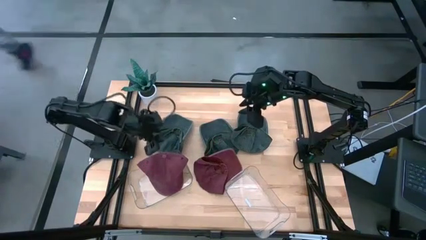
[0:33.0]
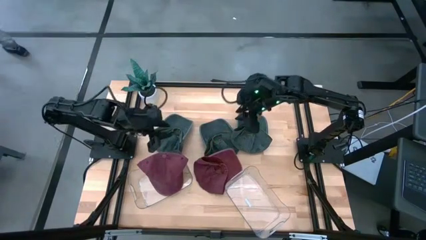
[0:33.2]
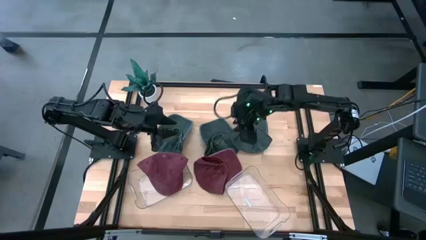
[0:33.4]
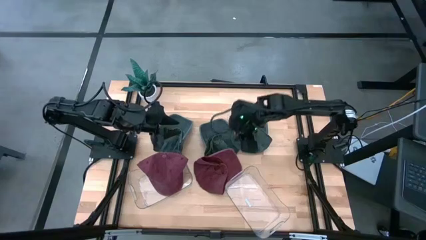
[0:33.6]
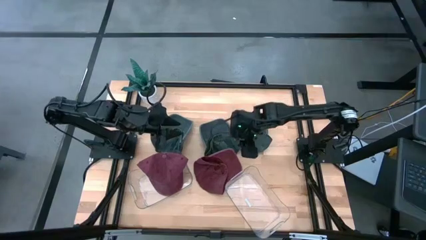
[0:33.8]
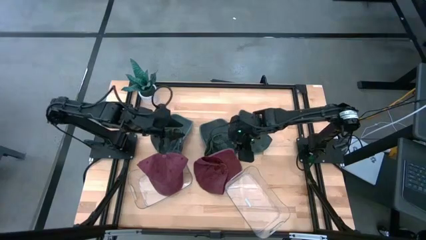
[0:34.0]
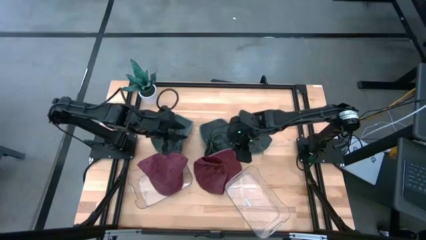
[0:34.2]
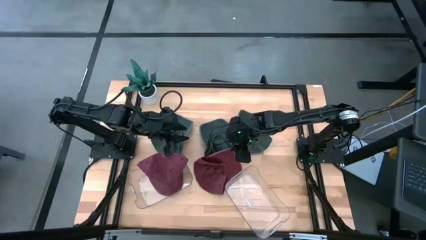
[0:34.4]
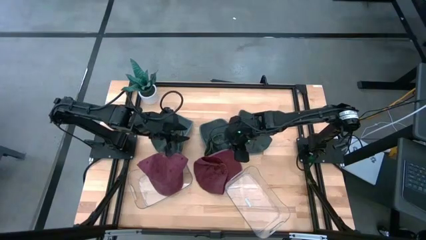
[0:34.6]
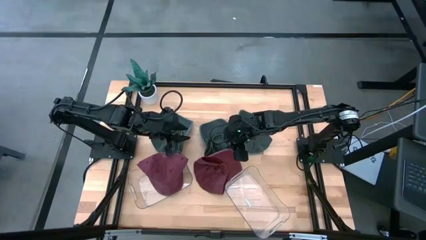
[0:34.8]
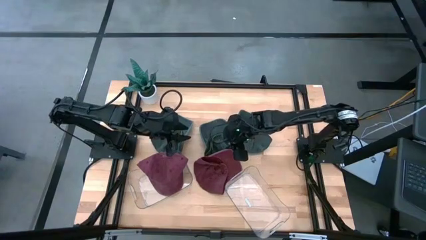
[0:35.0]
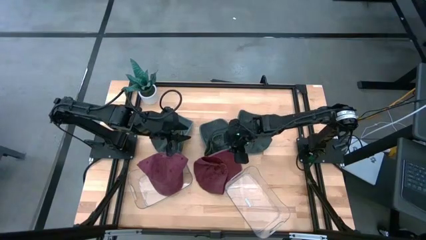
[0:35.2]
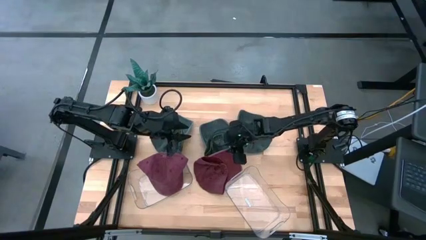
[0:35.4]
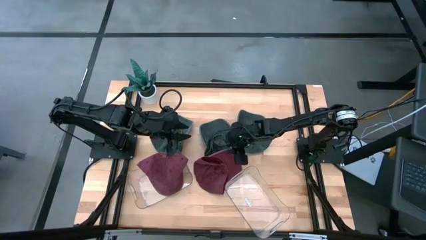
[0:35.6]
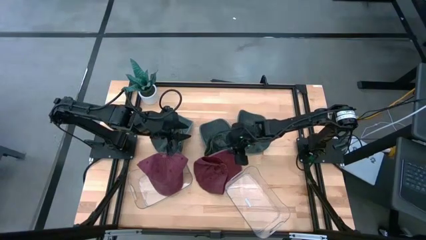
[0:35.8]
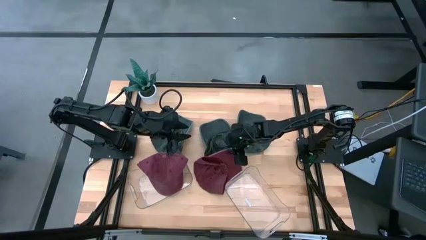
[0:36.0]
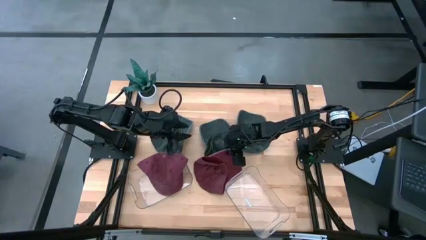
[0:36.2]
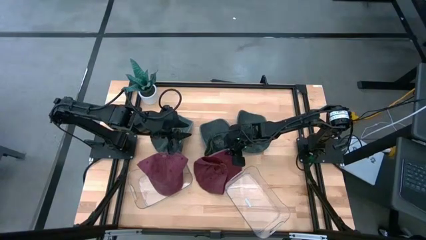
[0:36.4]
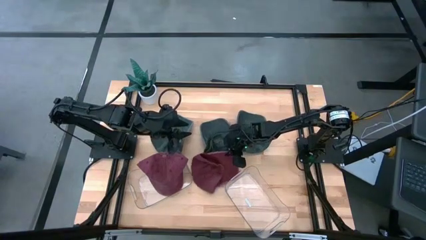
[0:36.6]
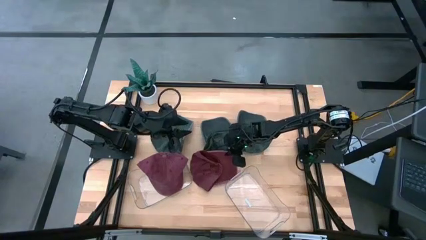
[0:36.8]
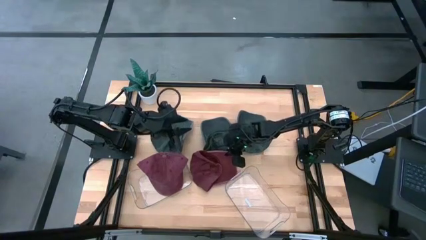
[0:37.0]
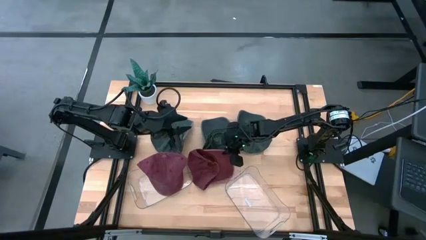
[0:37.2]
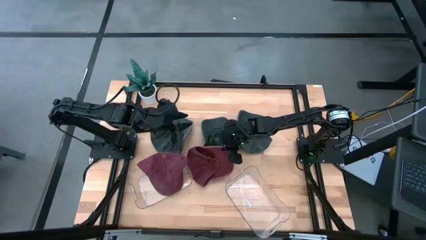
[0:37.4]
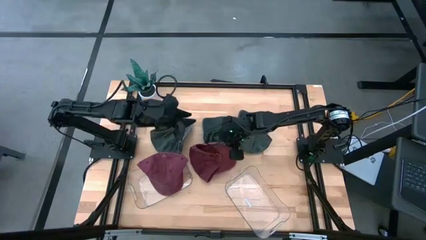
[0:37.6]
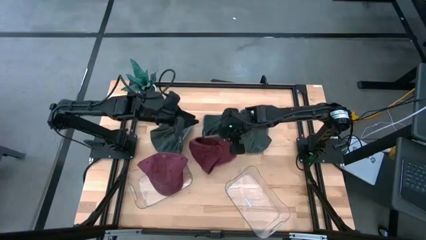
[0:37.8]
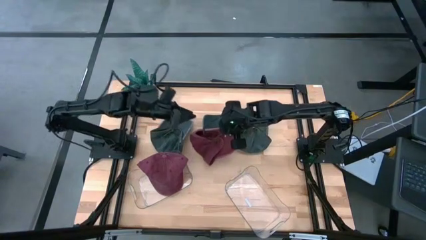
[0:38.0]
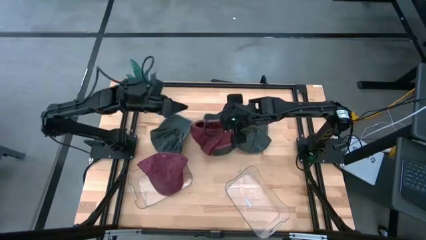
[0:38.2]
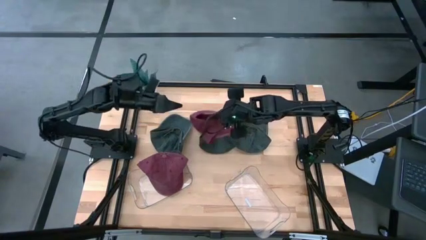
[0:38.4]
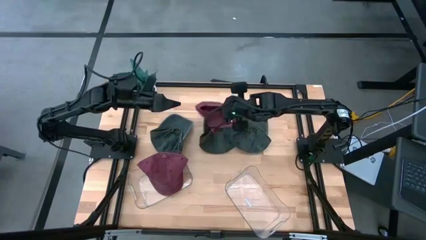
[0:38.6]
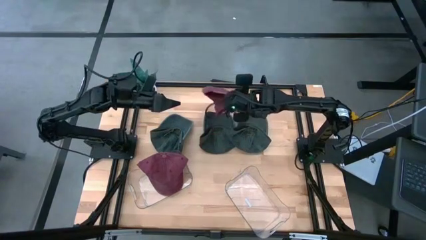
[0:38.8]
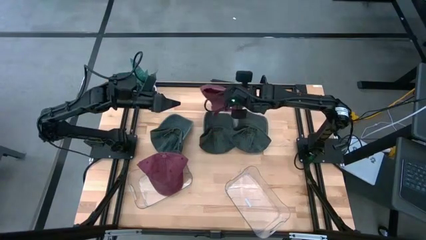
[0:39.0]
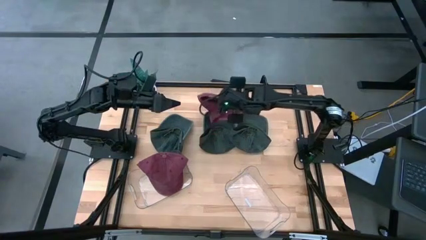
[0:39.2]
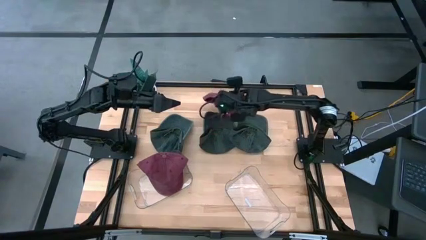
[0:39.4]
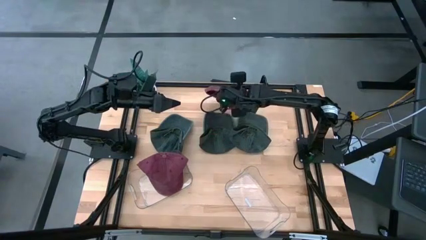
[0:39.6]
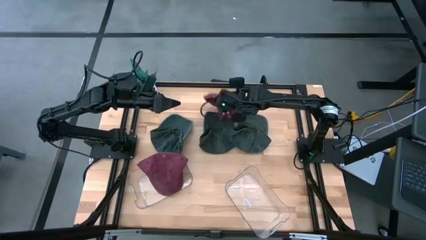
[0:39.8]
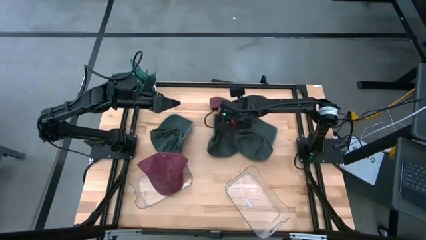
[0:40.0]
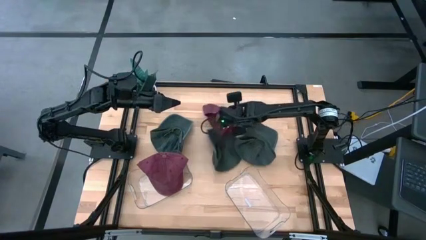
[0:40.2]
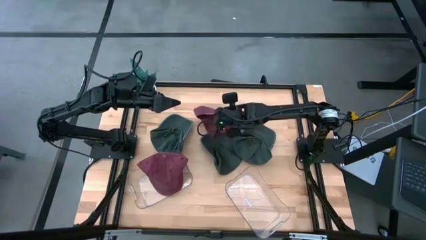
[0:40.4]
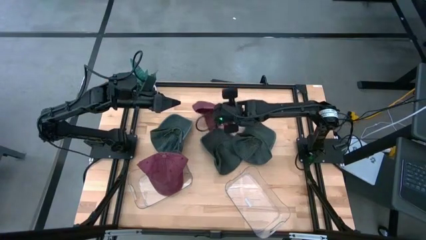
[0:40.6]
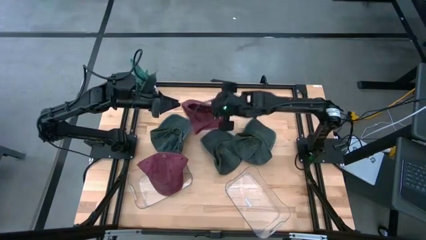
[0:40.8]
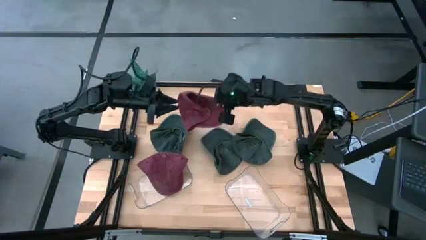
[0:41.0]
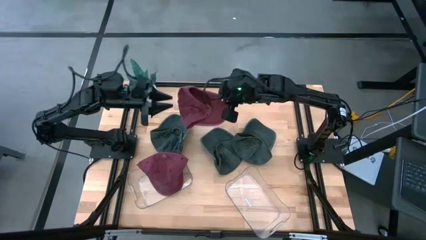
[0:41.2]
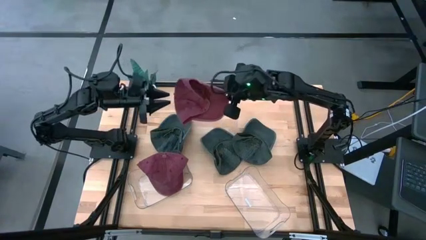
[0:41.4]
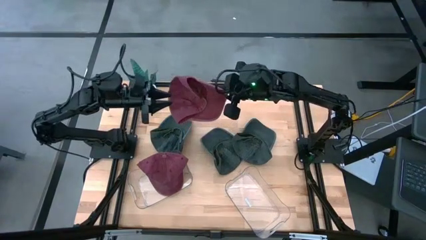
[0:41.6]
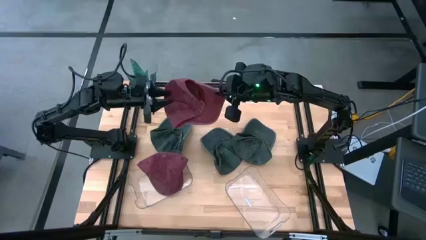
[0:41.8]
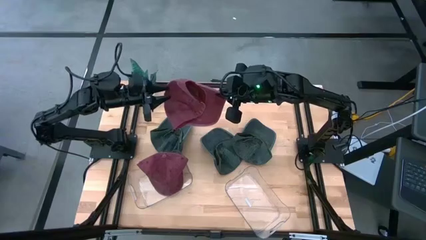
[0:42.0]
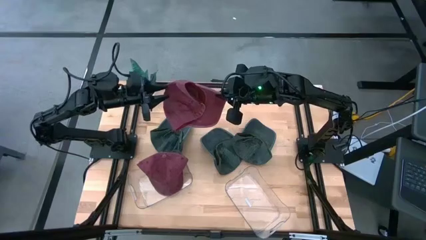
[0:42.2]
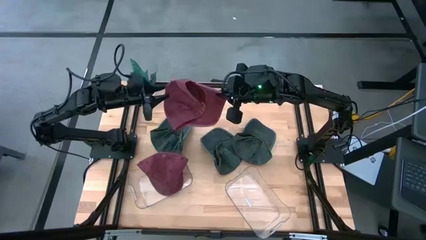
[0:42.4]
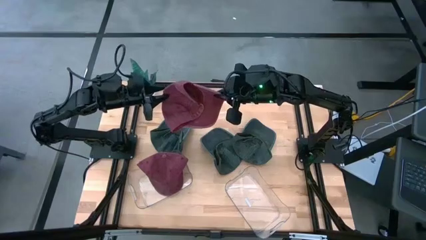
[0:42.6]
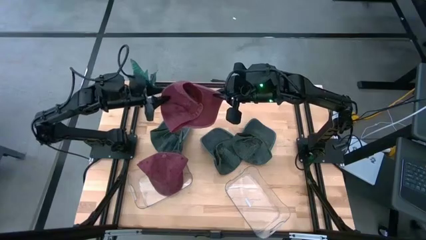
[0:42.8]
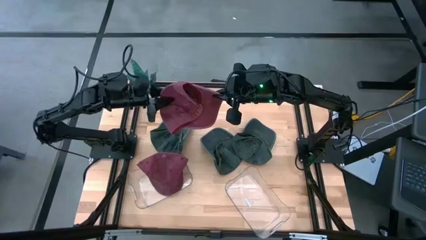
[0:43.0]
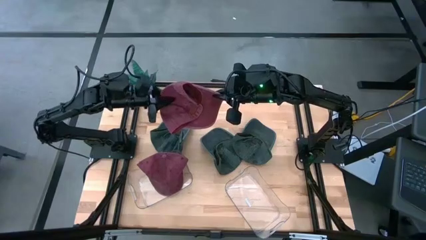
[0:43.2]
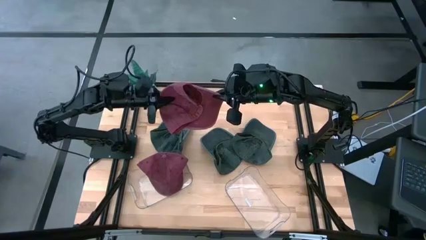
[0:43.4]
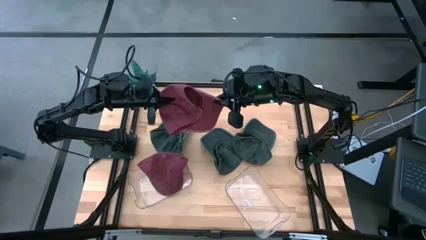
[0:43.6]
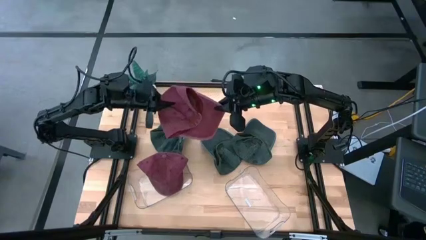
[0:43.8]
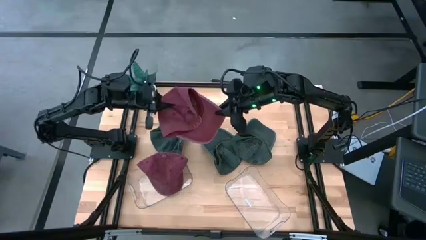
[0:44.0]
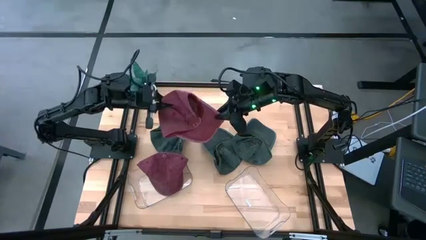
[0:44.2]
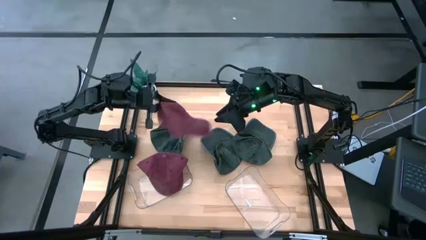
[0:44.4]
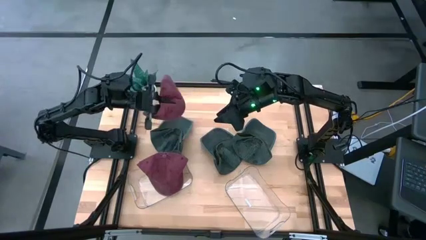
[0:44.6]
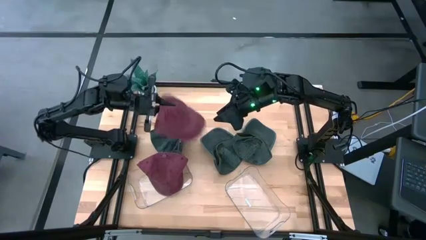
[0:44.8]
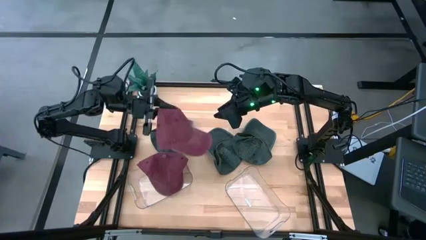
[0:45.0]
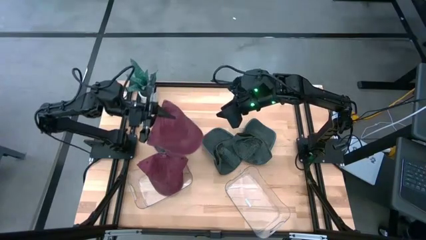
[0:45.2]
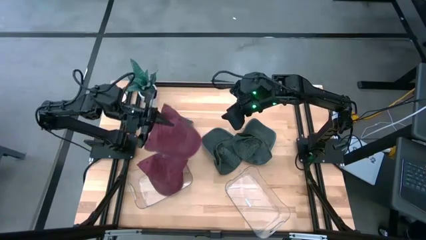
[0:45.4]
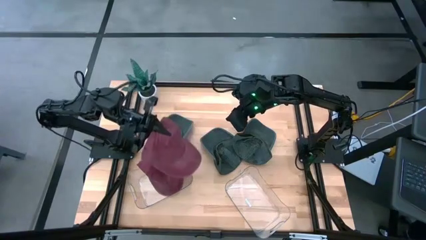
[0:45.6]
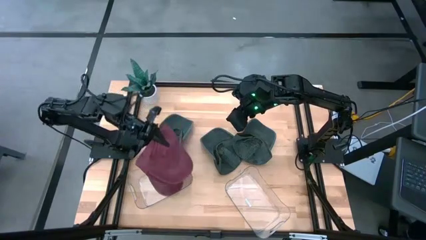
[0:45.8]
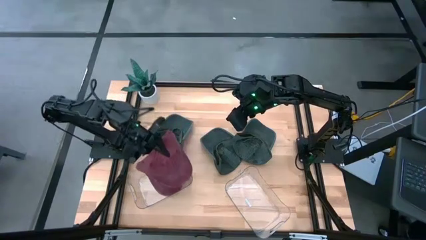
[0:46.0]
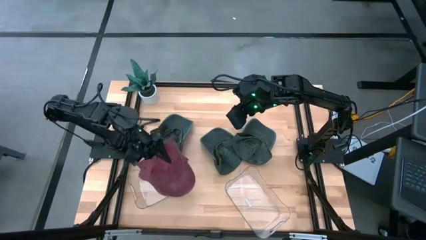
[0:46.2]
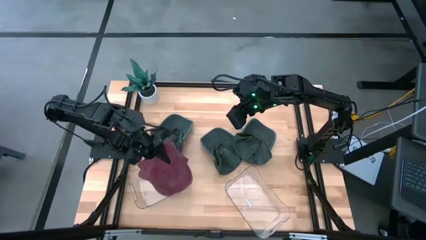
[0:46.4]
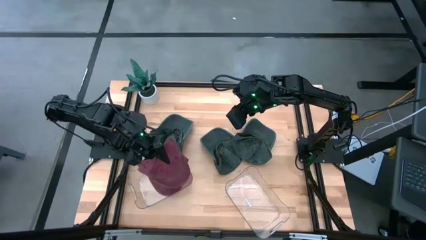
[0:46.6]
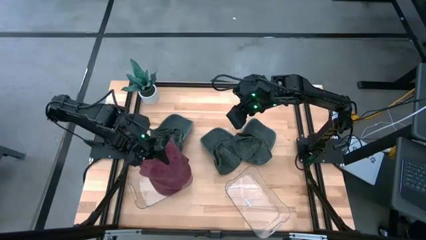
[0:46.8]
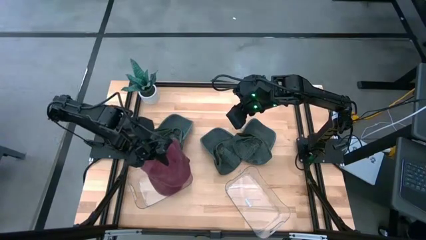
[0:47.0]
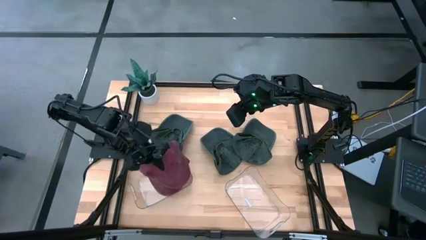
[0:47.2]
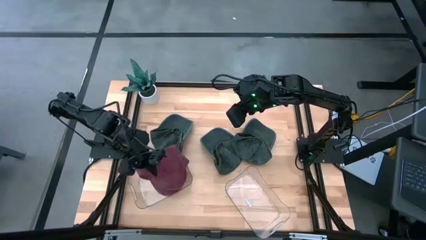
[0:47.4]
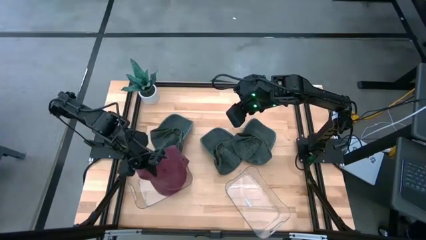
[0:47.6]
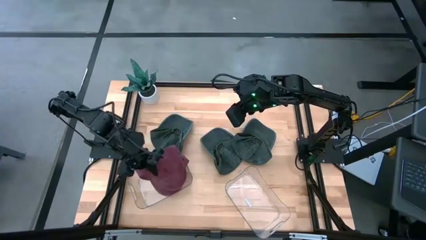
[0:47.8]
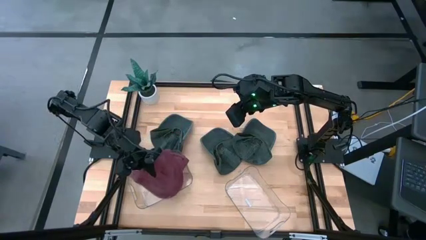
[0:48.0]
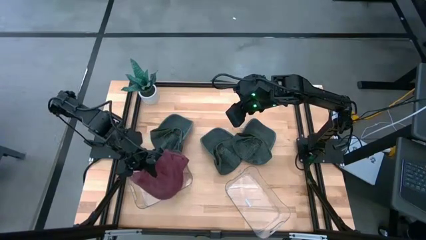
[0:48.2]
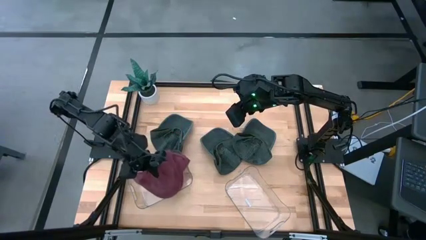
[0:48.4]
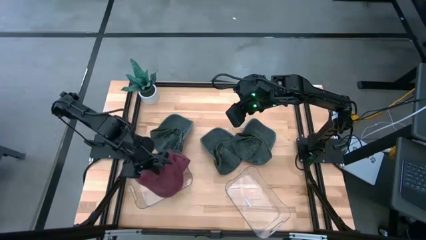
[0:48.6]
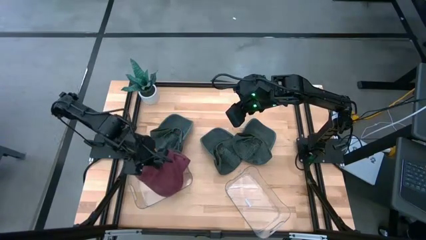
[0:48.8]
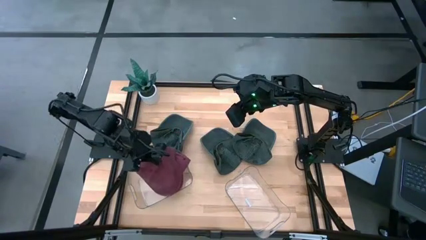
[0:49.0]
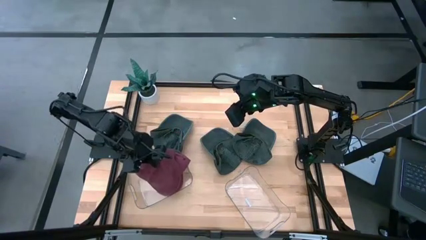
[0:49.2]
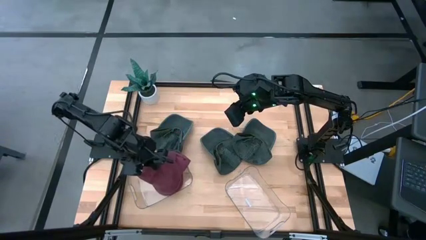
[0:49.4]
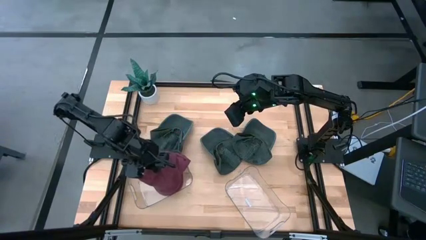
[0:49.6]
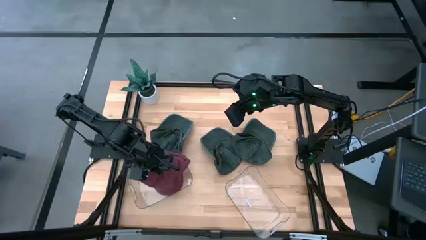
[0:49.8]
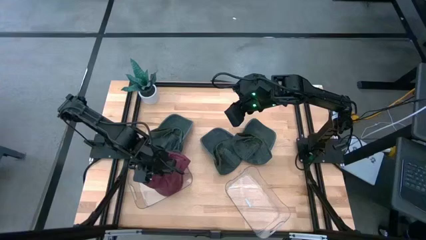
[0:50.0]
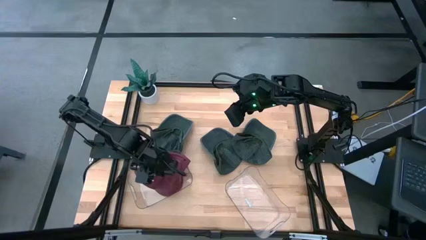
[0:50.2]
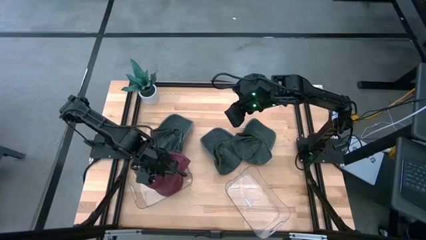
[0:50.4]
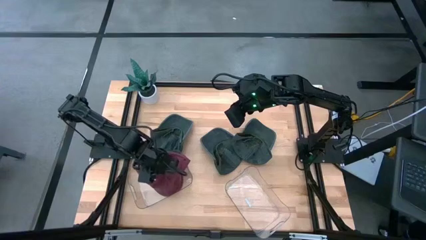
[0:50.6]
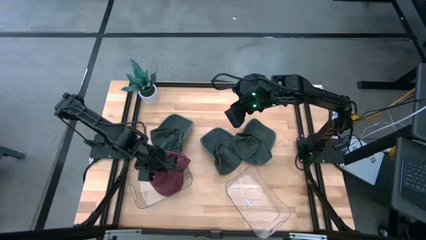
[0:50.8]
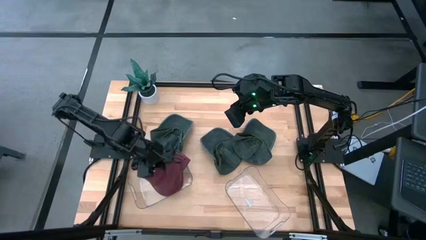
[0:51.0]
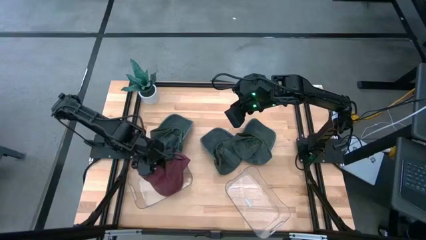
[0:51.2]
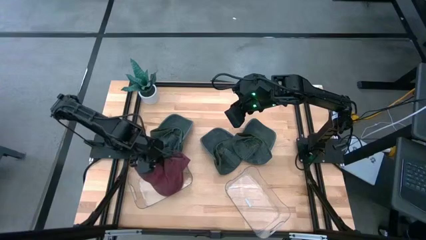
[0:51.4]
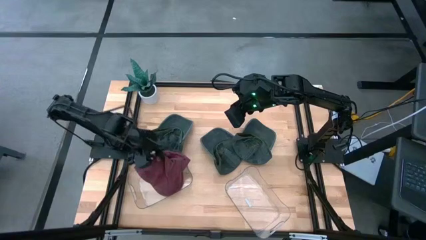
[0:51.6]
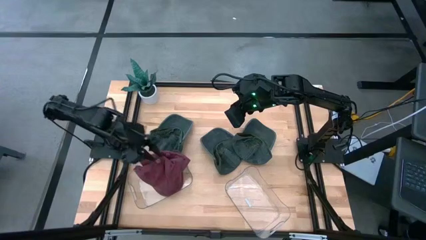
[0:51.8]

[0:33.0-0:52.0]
Task: Pick & Place hat
Put the red cap into the left transparent bin
